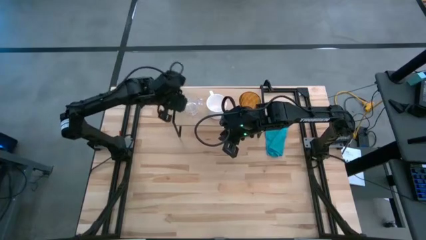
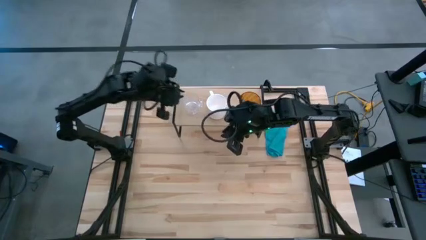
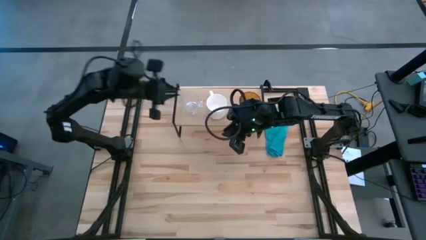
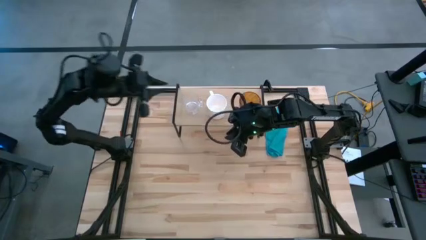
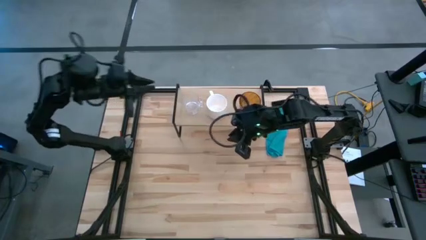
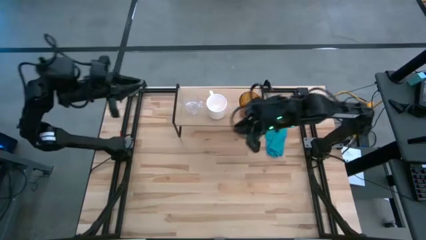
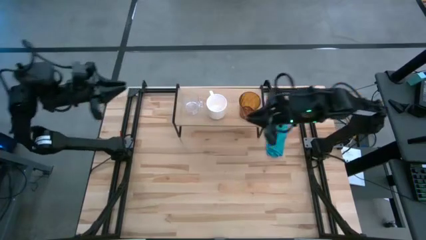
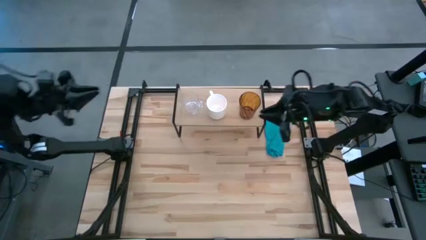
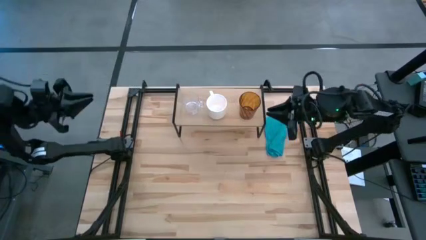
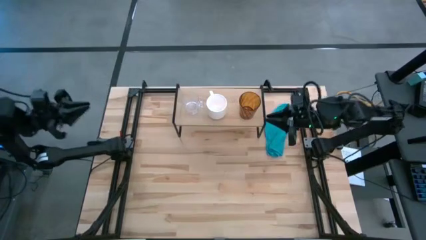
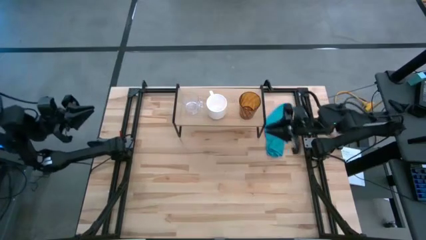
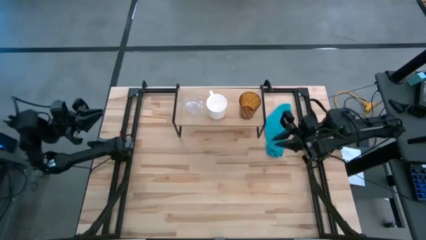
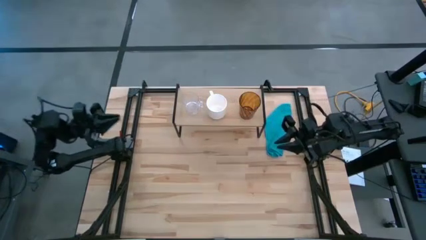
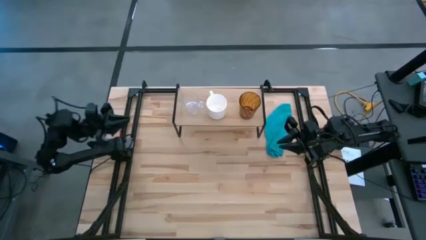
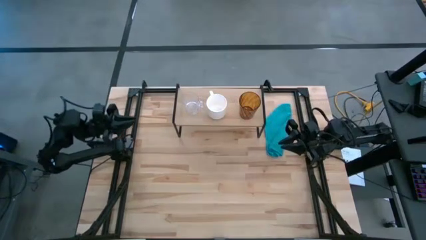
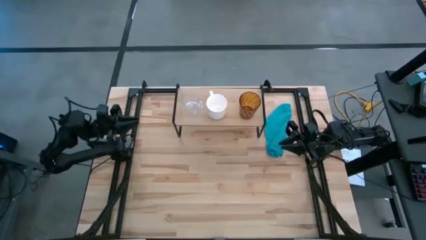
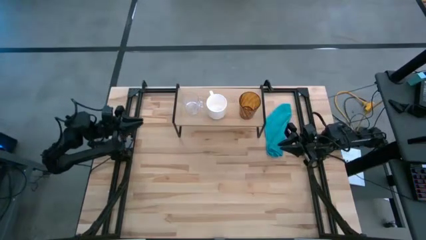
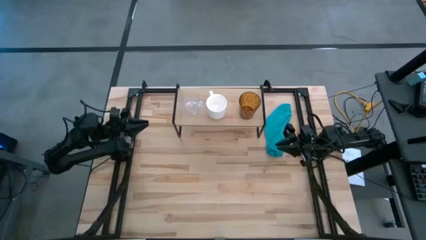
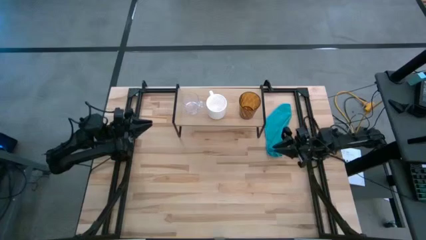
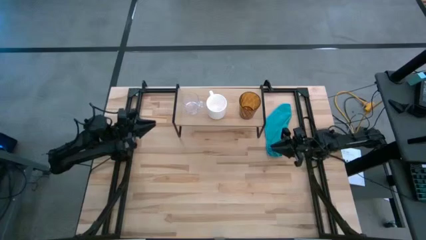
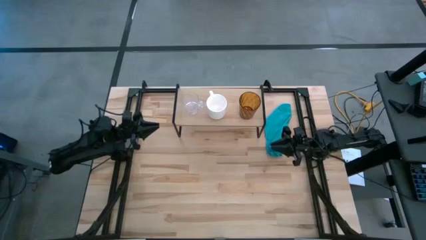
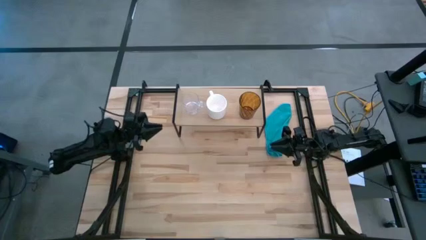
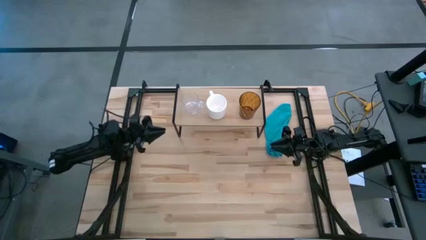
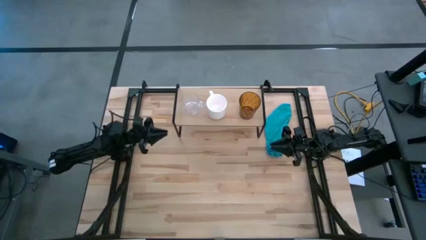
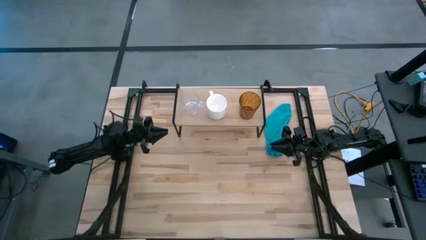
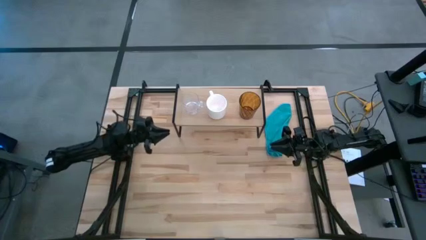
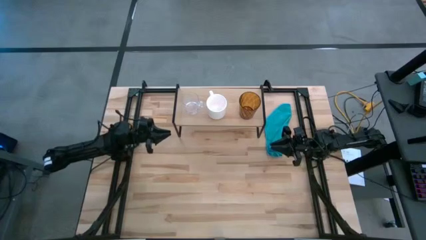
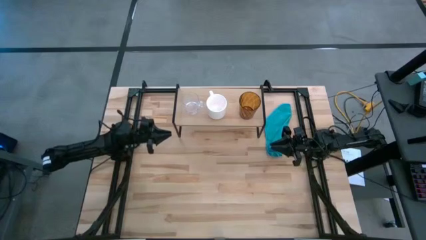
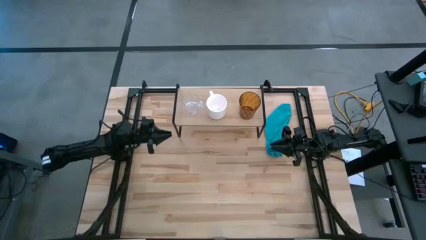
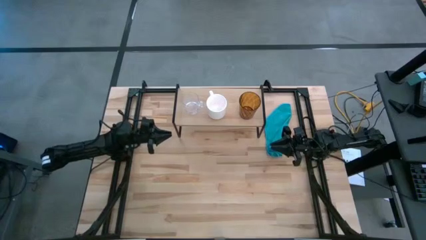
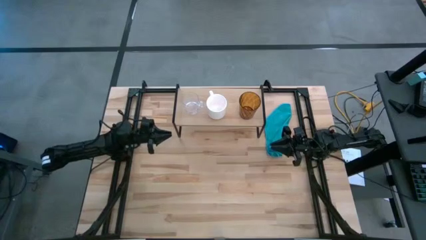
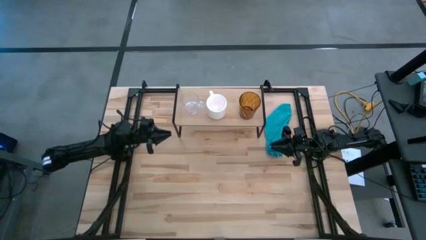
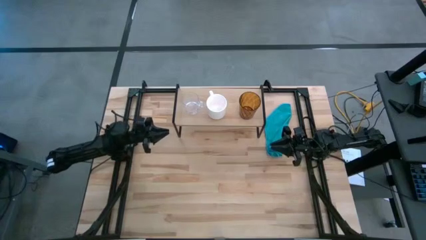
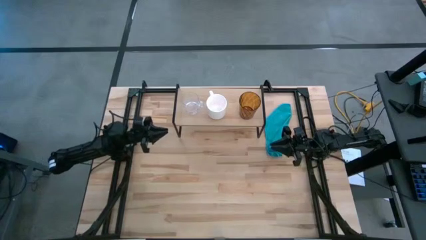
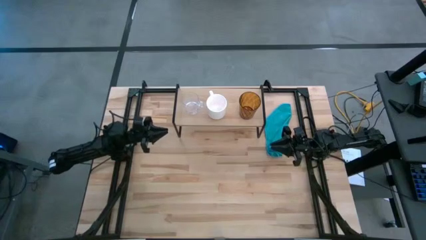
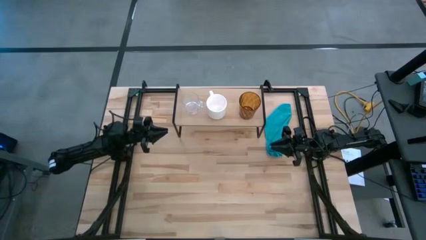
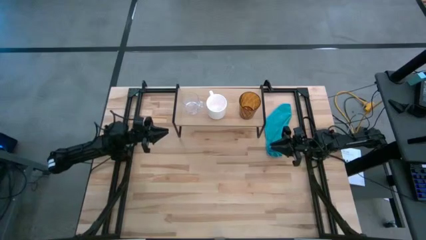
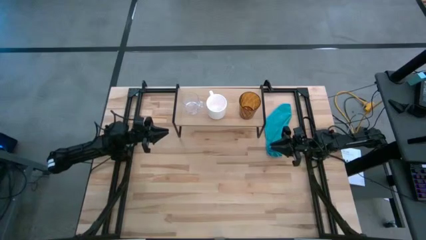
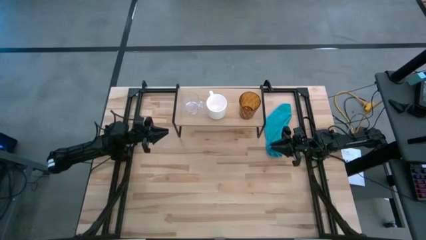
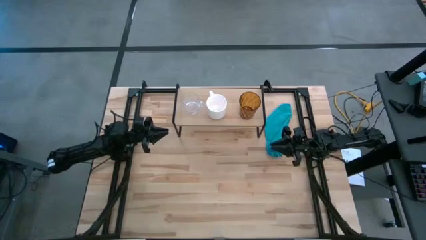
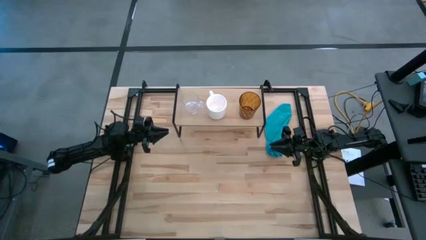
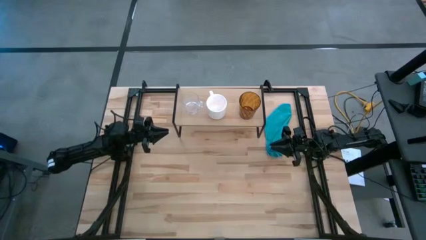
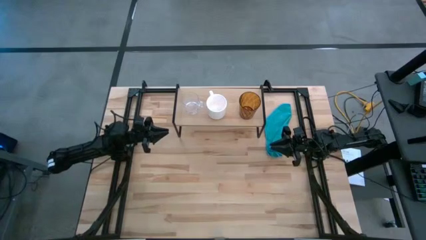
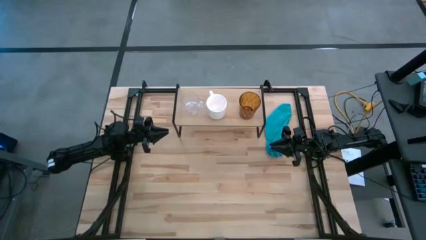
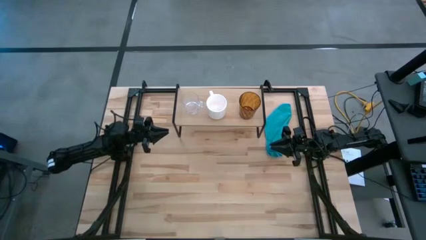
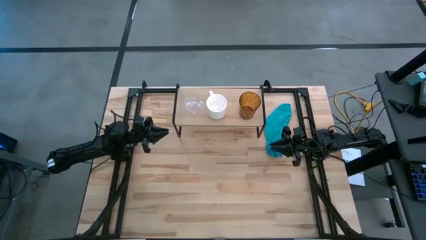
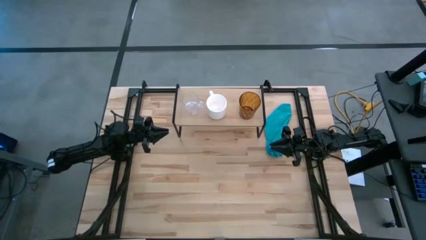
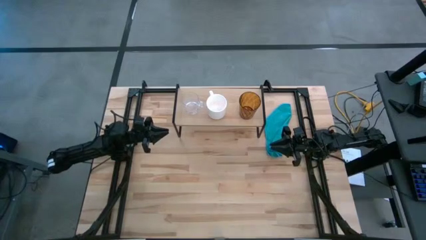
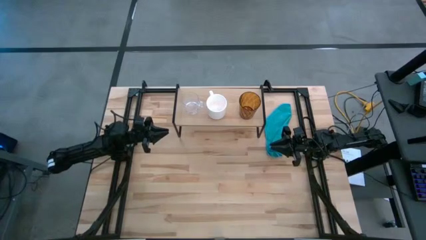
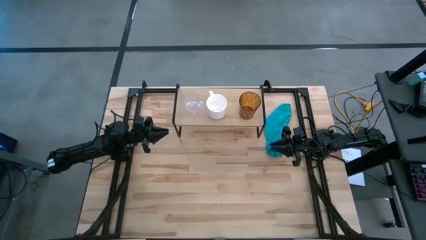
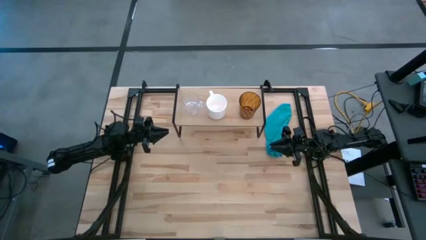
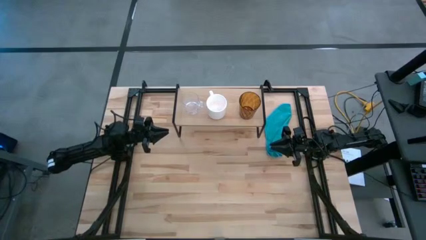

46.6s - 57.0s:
Task: Stack small to large cups/mugs on shelf
Return to Home Position
